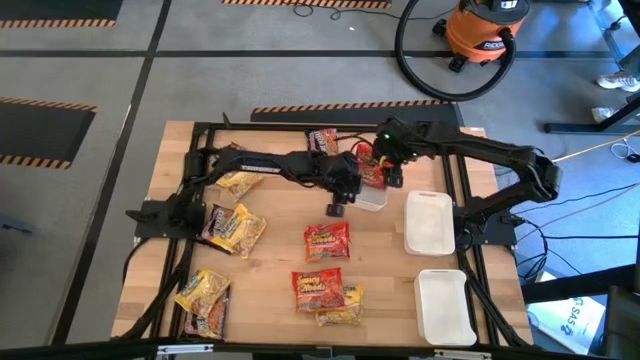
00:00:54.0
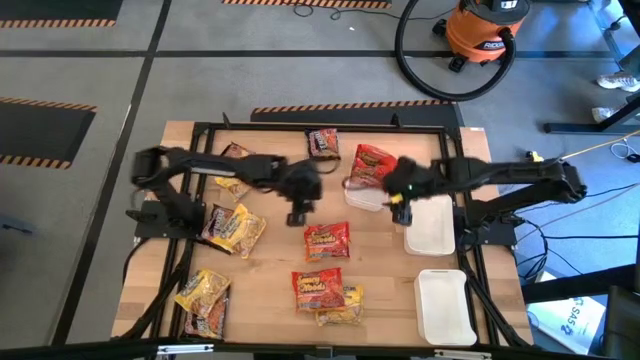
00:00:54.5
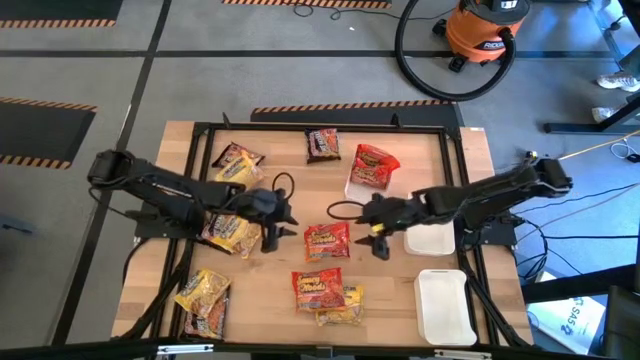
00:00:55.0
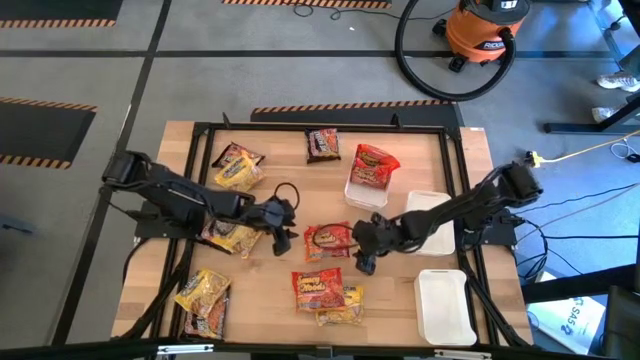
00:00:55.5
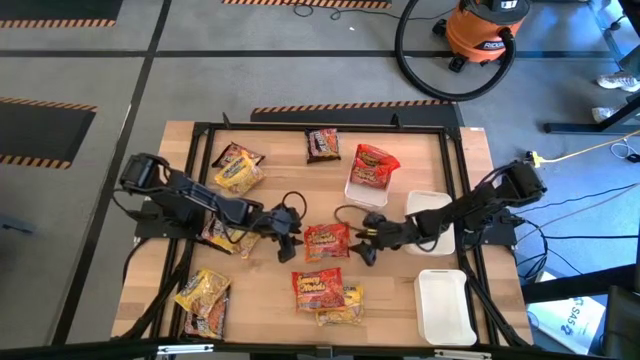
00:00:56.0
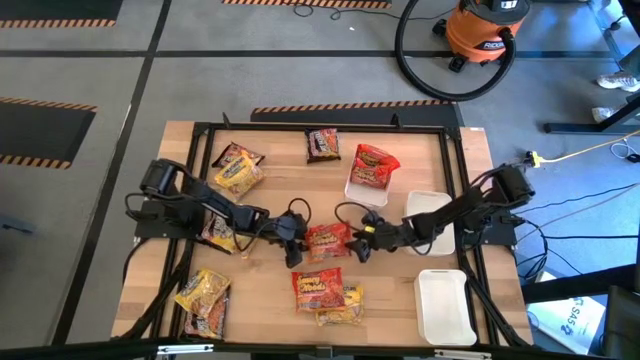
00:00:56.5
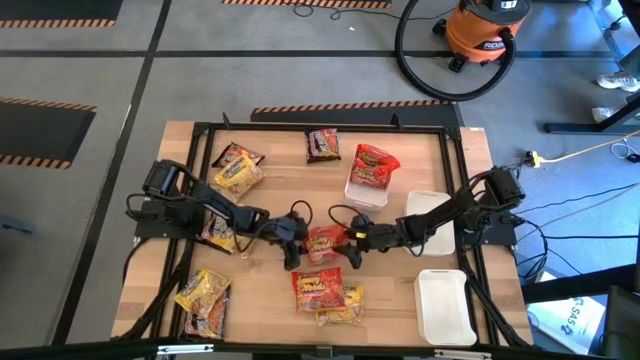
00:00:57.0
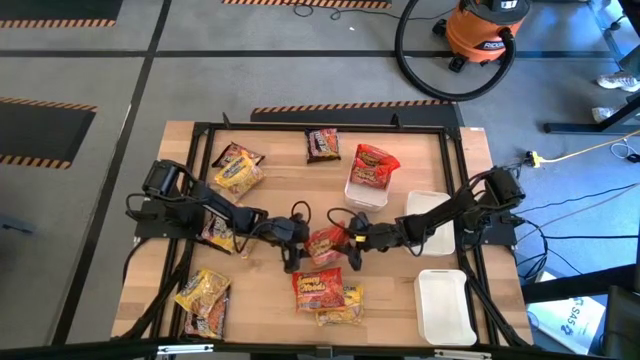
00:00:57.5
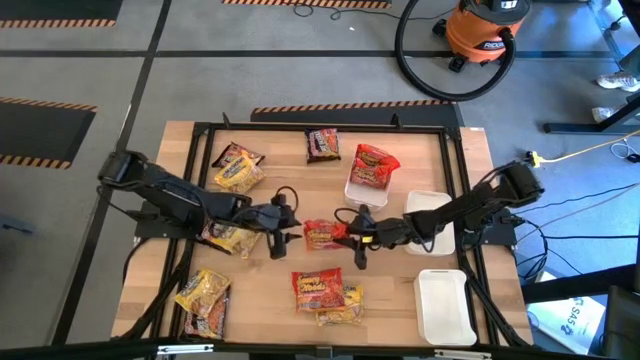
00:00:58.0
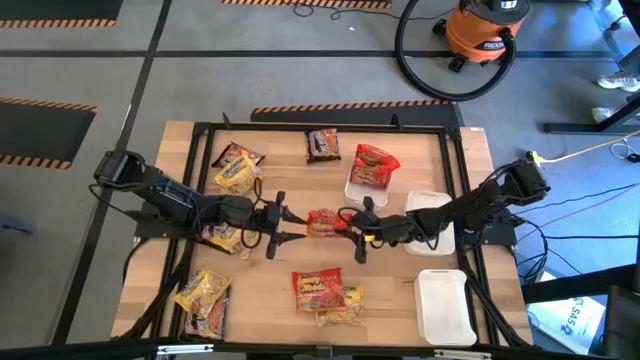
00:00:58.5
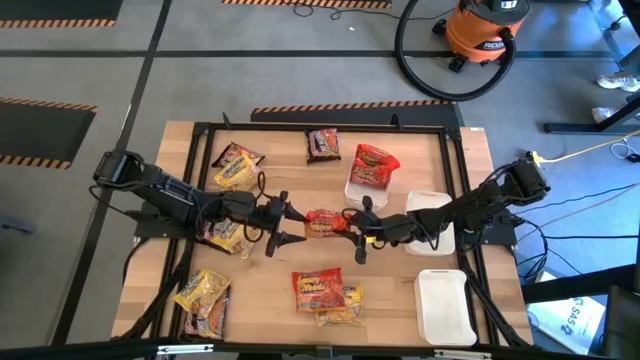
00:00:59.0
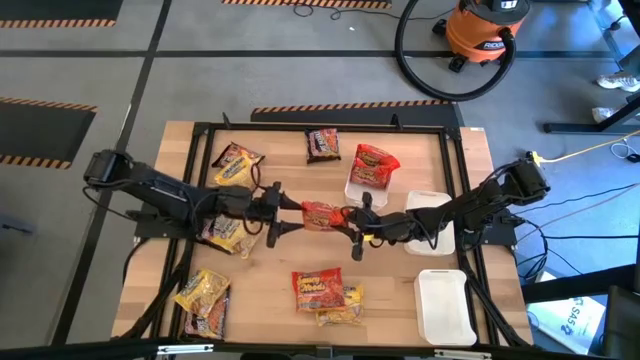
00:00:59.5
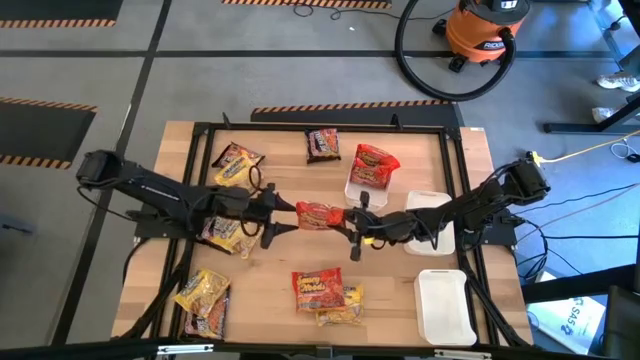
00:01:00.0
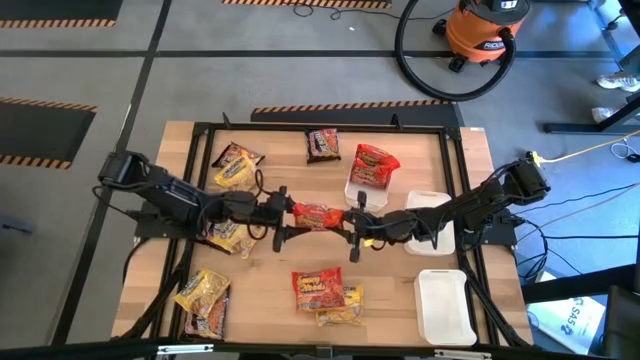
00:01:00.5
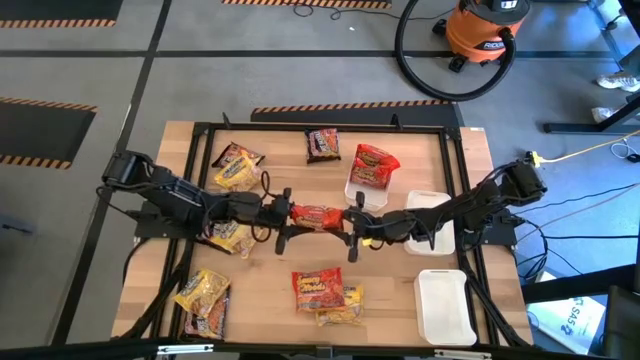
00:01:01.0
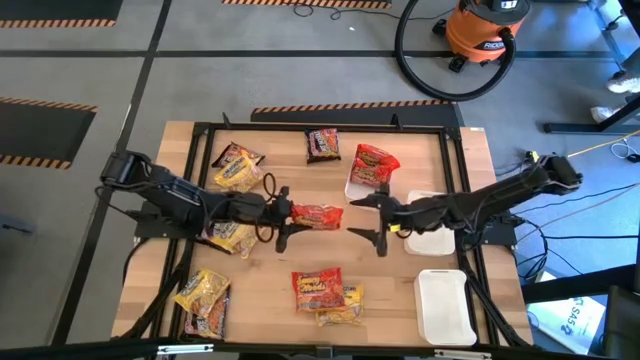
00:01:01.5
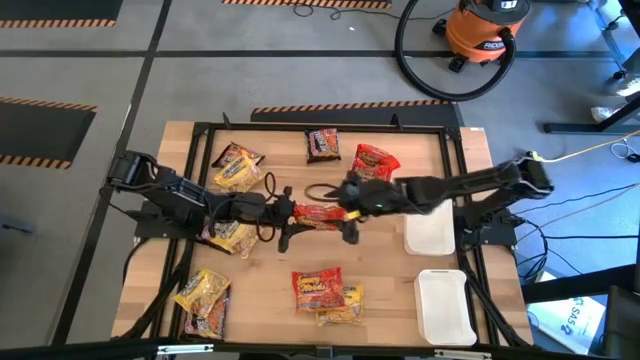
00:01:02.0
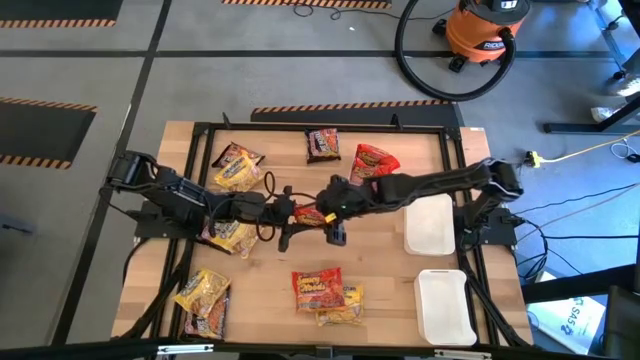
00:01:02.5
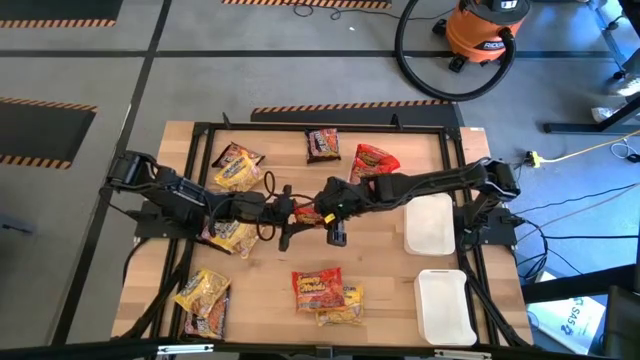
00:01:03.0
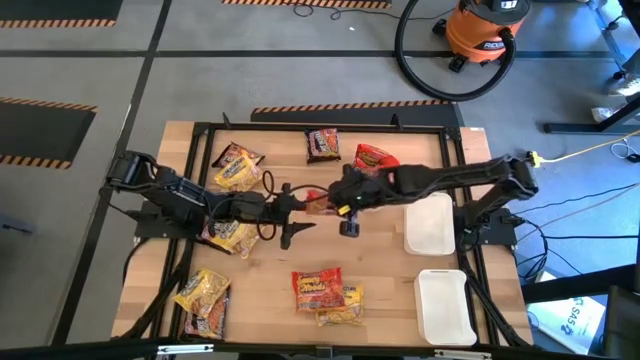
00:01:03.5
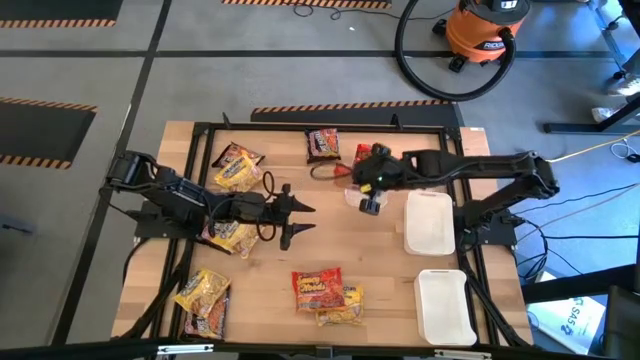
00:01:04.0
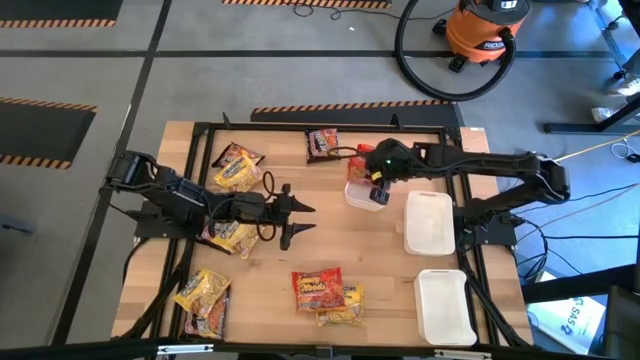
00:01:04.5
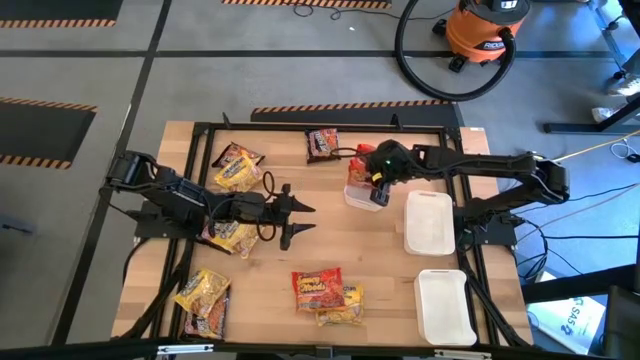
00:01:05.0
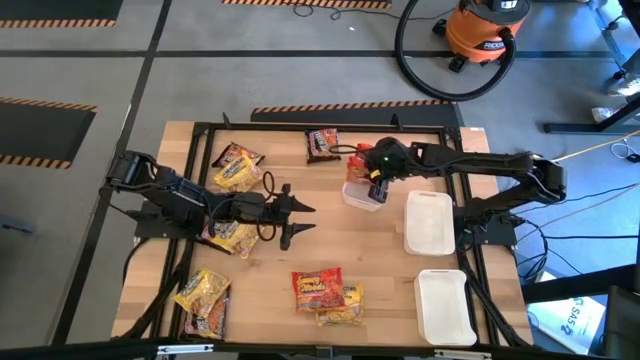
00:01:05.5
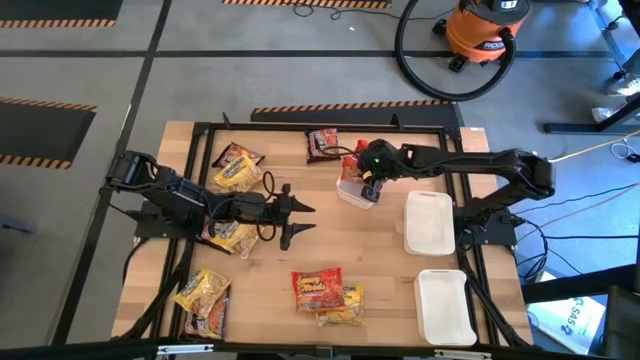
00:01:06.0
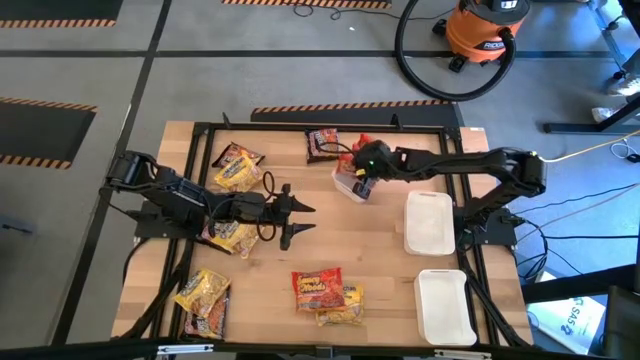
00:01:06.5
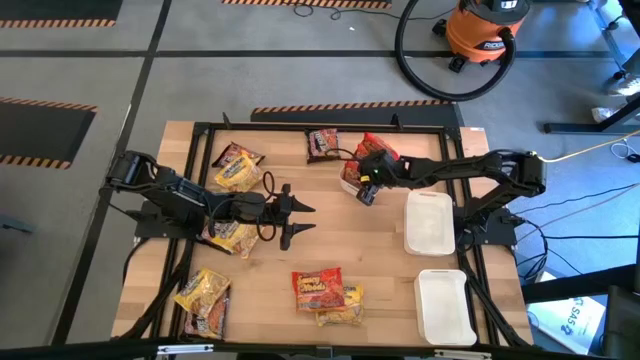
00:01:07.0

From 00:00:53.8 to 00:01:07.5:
Task: Sort Maruchan noodles
Put the orange noodle pack into the top white bin

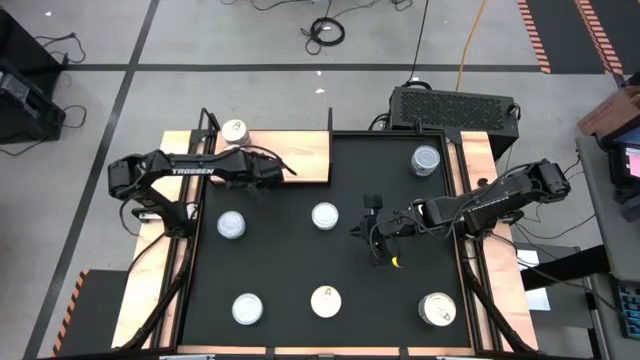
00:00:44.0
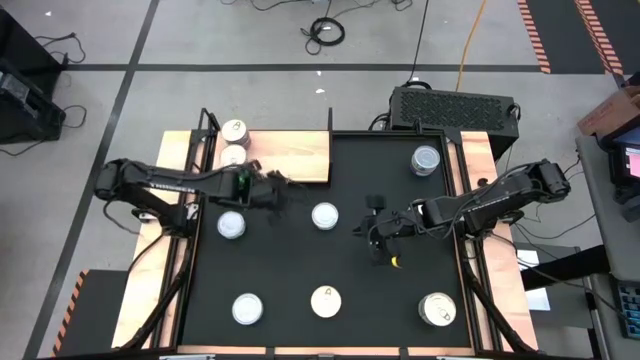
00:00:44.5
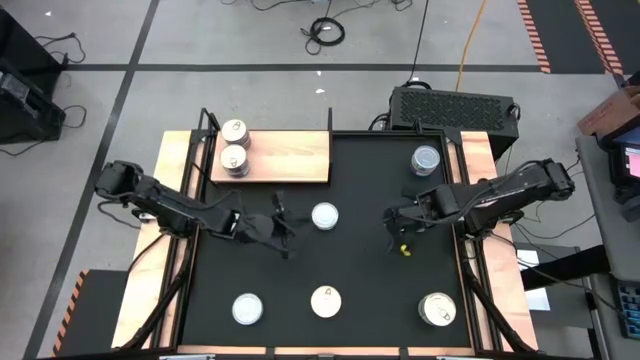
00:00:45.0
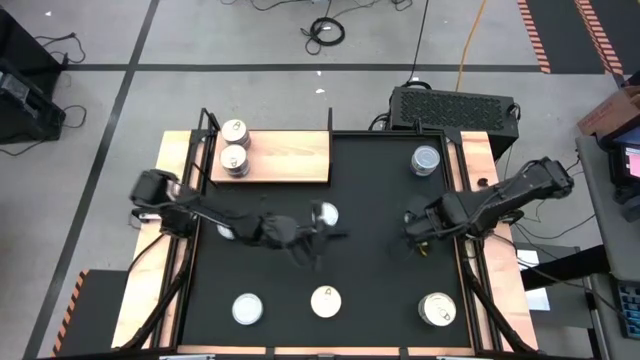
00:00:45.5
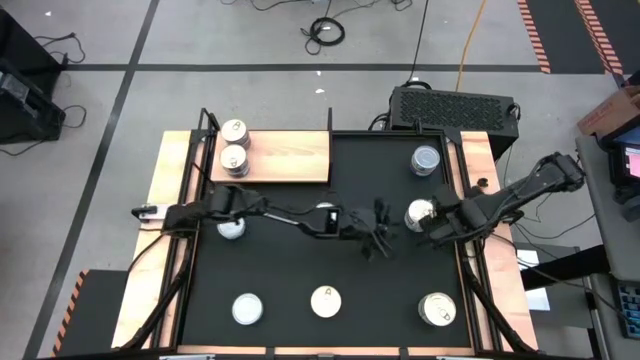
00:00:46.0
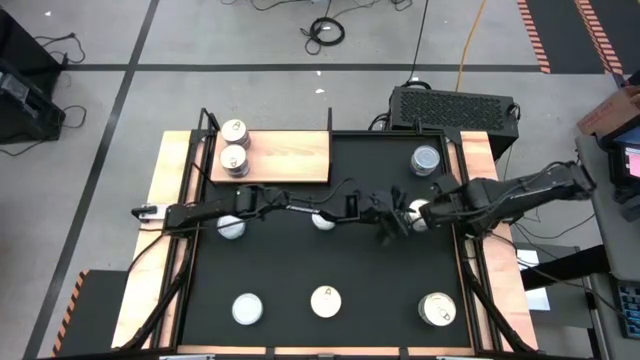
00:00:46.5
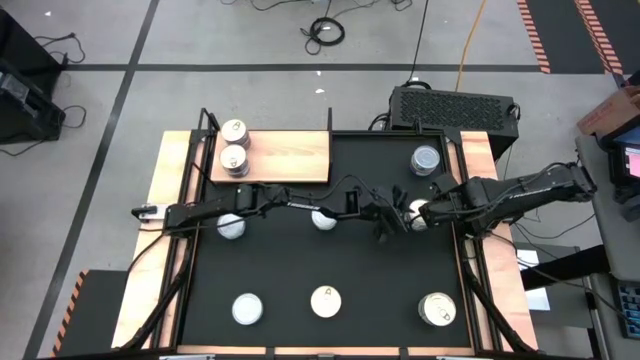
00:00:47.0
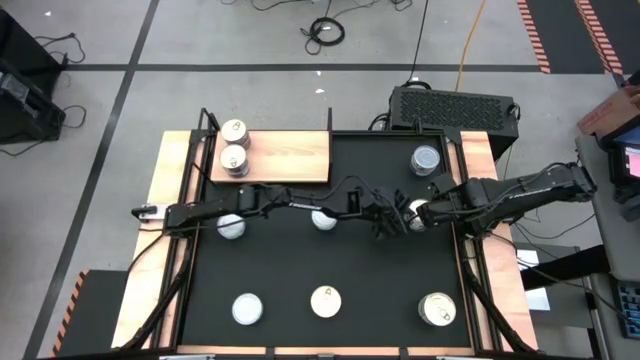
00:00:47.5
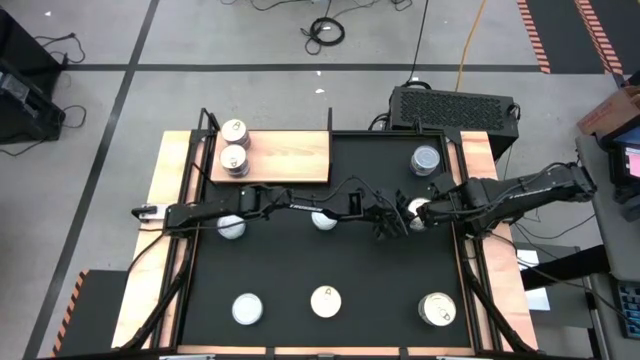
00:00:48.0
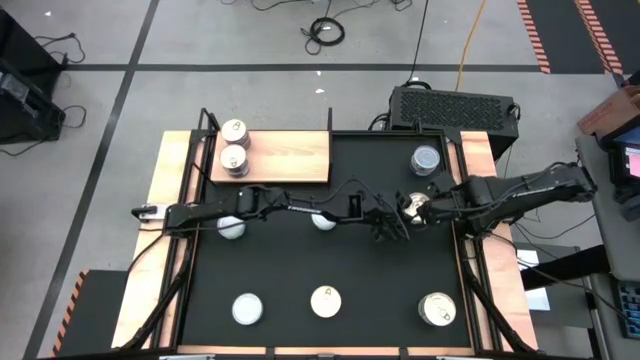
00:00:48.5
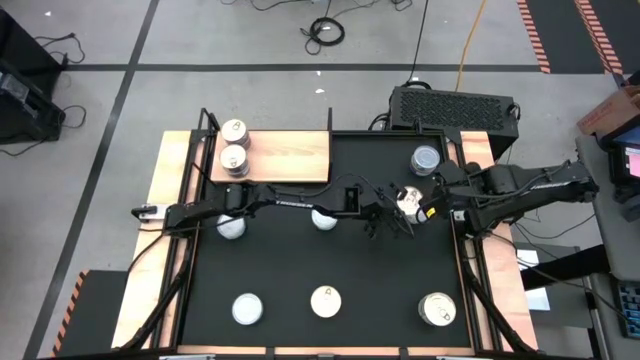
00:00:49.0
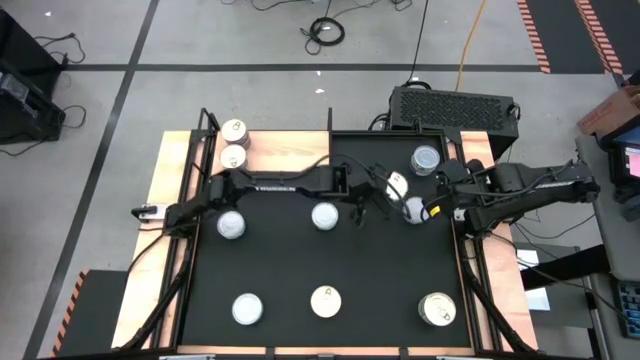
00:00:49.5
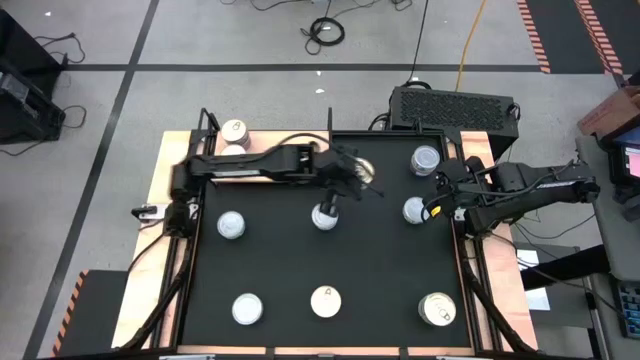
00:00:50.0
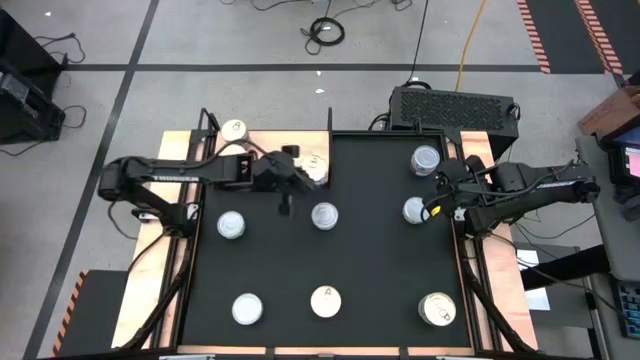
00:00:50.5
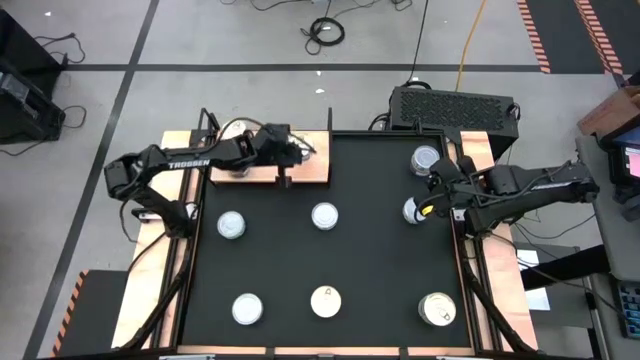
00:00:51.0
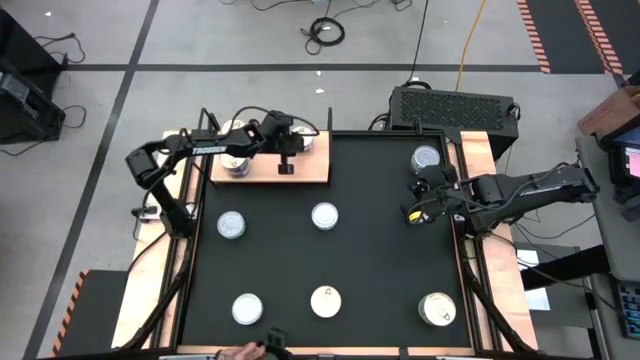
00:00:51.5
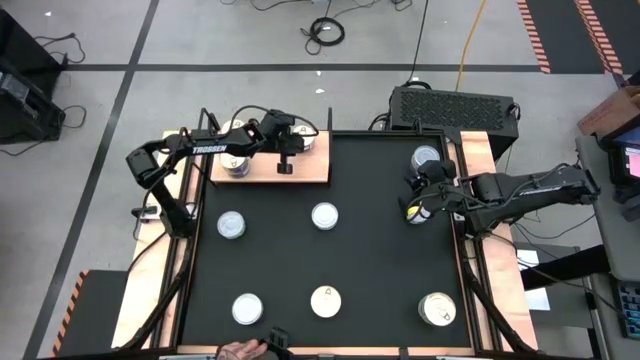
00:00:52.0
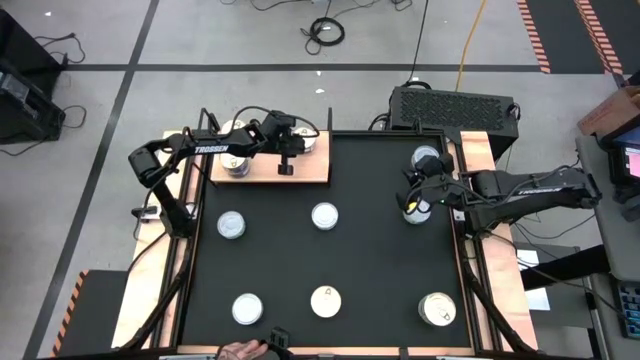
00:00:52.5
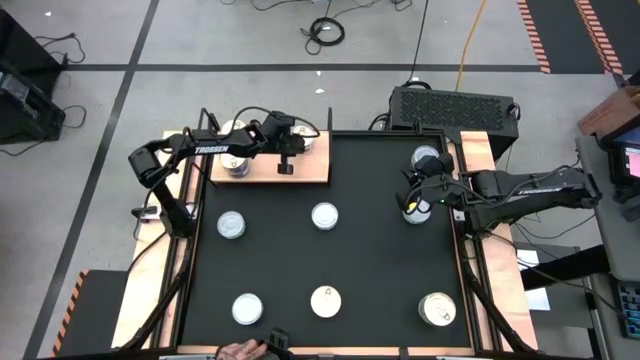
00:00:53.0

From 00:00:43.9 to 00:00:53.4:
Task: Stack canned seafood by type on shelf
Put the blue tuna can on the shelf
